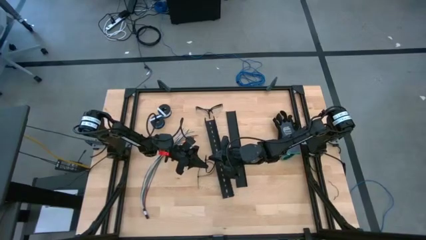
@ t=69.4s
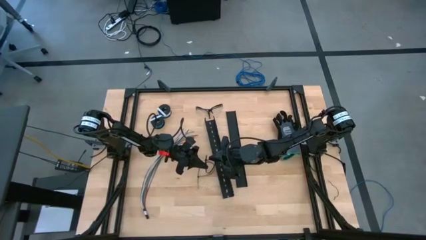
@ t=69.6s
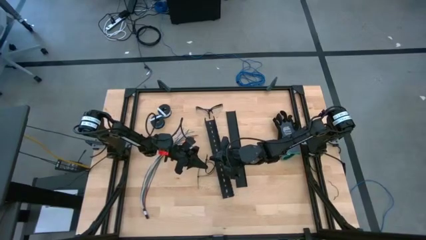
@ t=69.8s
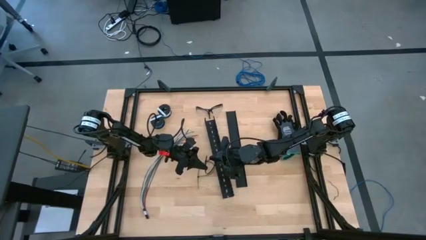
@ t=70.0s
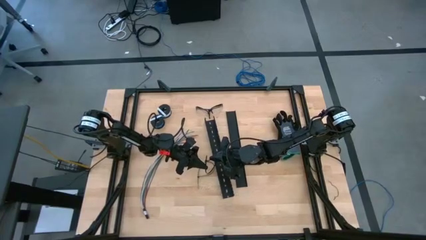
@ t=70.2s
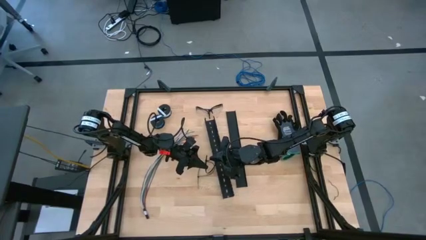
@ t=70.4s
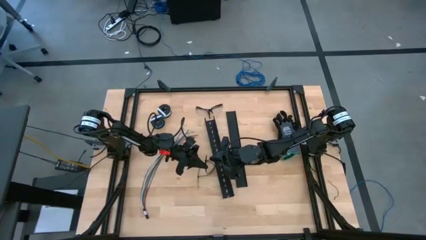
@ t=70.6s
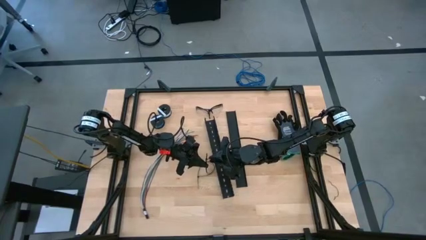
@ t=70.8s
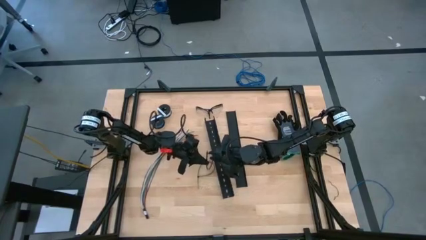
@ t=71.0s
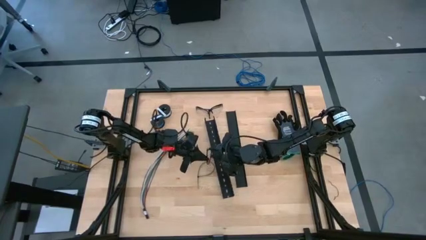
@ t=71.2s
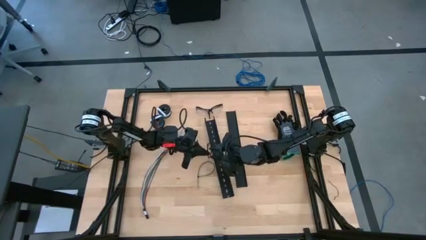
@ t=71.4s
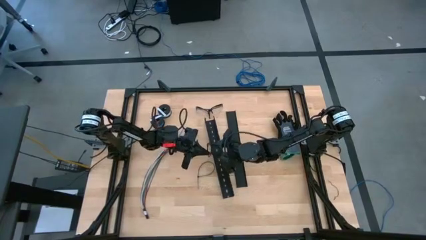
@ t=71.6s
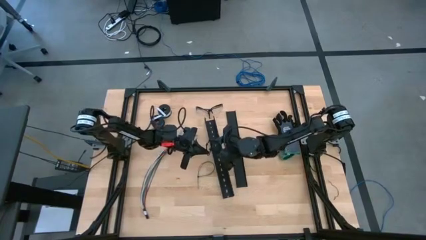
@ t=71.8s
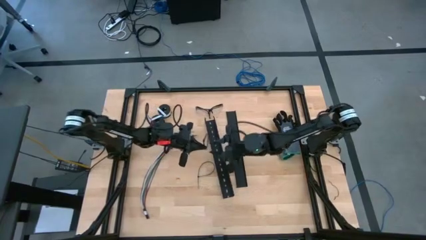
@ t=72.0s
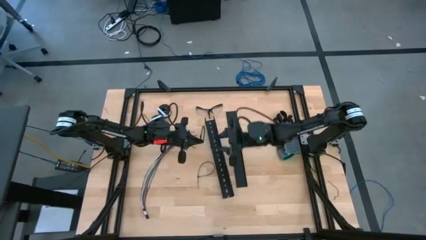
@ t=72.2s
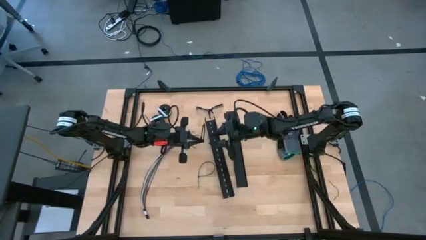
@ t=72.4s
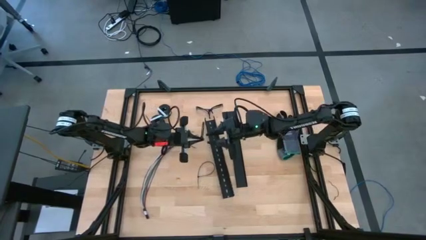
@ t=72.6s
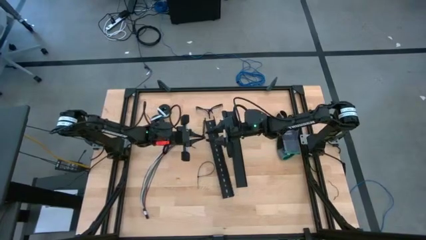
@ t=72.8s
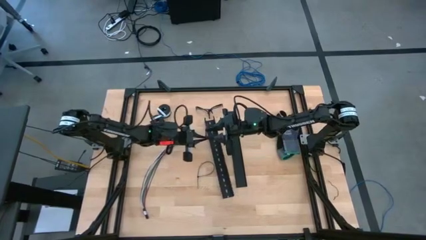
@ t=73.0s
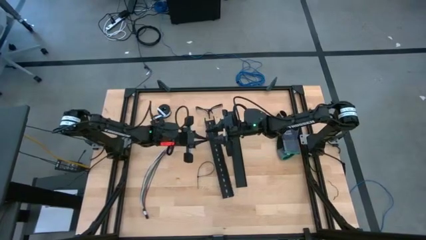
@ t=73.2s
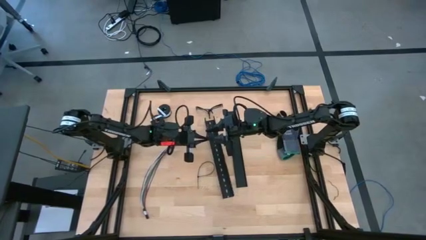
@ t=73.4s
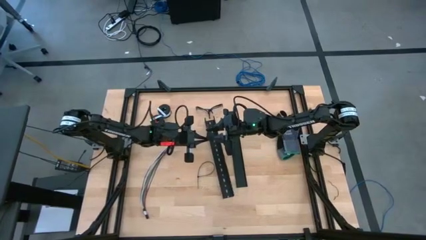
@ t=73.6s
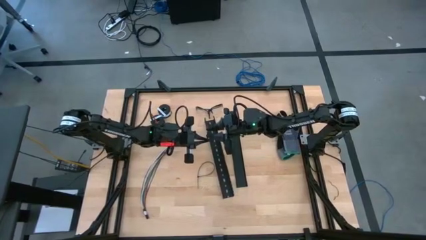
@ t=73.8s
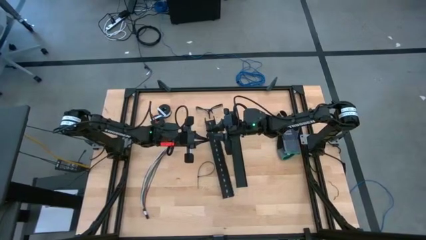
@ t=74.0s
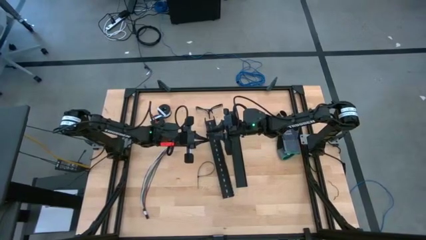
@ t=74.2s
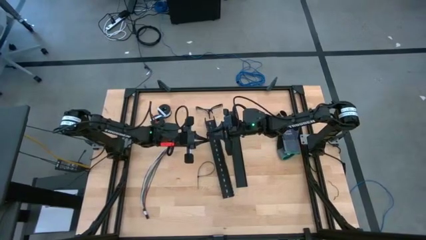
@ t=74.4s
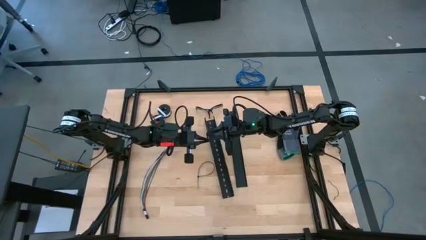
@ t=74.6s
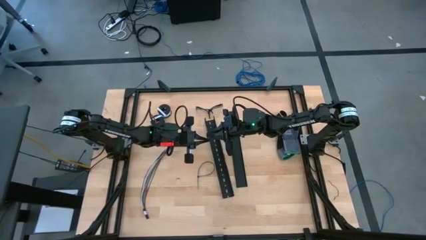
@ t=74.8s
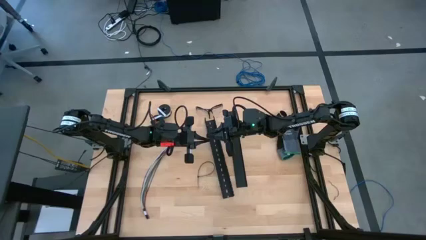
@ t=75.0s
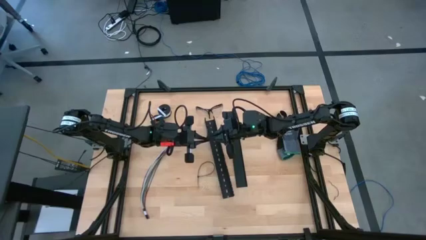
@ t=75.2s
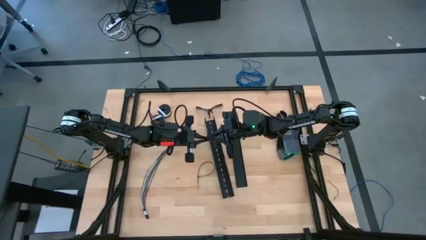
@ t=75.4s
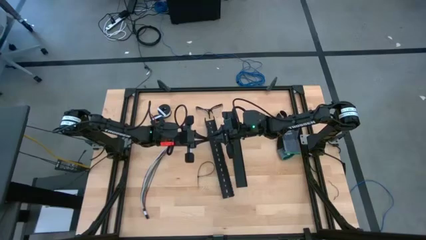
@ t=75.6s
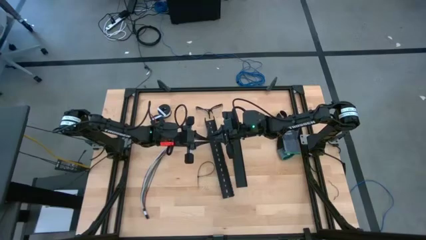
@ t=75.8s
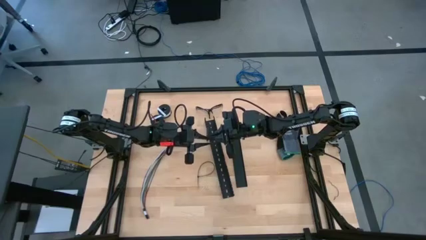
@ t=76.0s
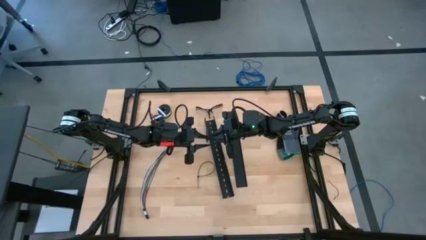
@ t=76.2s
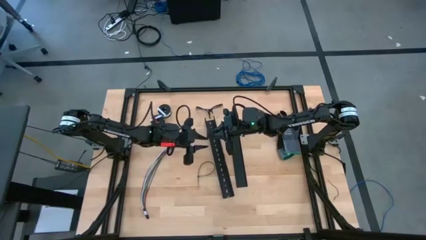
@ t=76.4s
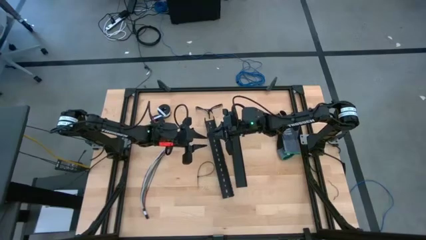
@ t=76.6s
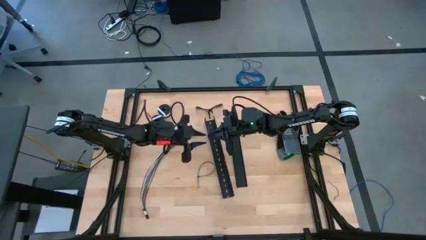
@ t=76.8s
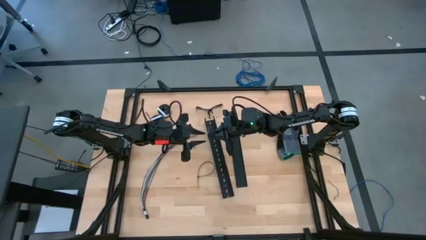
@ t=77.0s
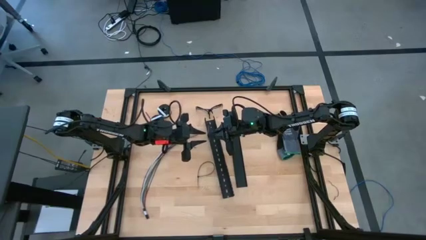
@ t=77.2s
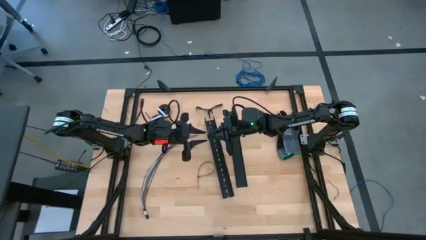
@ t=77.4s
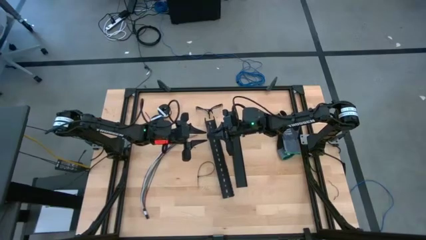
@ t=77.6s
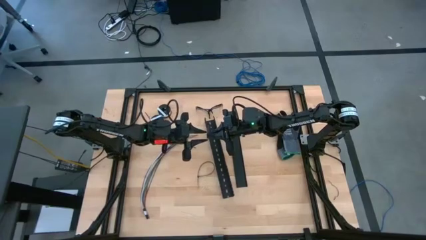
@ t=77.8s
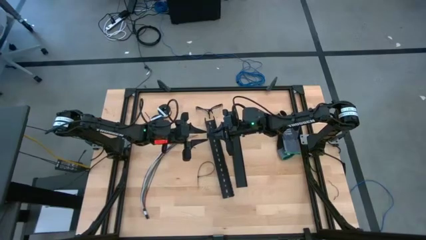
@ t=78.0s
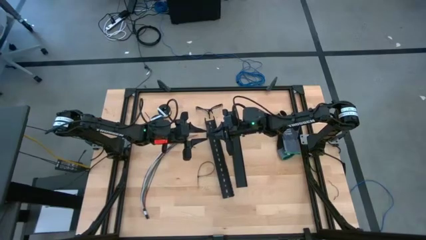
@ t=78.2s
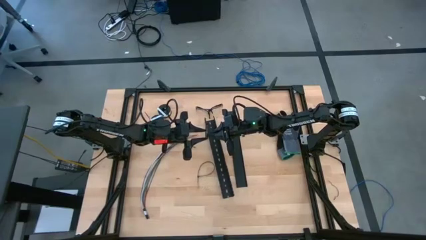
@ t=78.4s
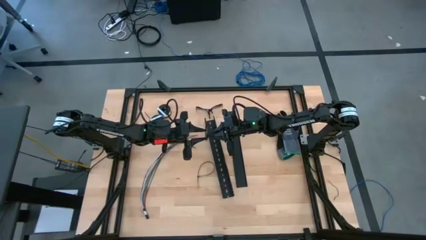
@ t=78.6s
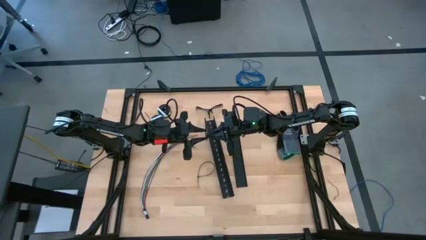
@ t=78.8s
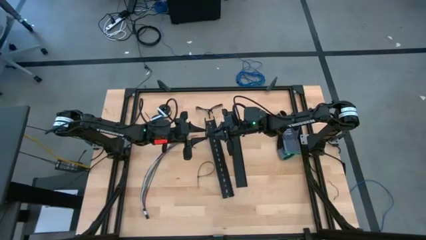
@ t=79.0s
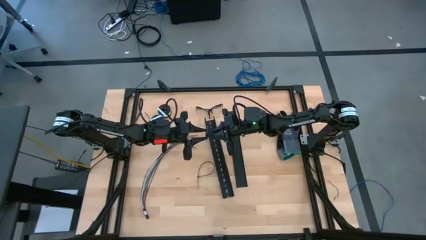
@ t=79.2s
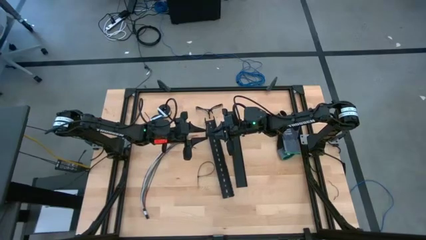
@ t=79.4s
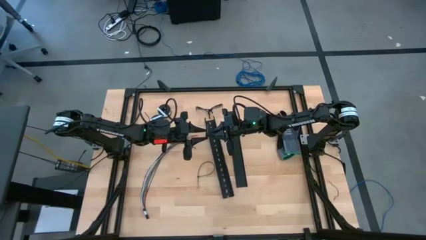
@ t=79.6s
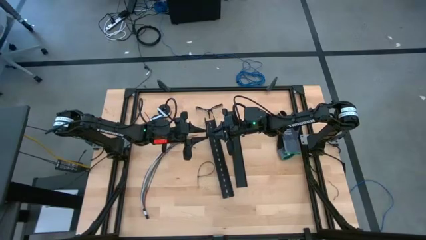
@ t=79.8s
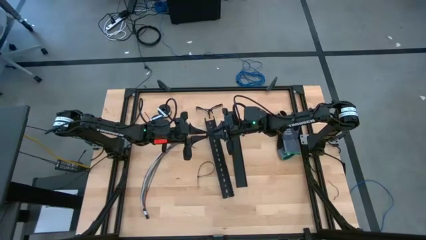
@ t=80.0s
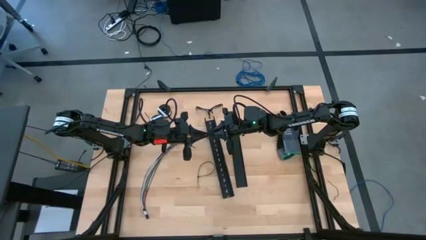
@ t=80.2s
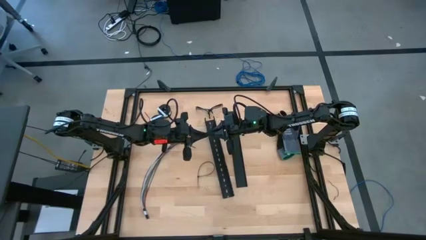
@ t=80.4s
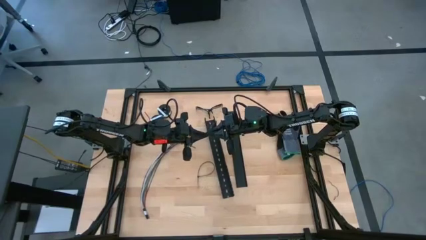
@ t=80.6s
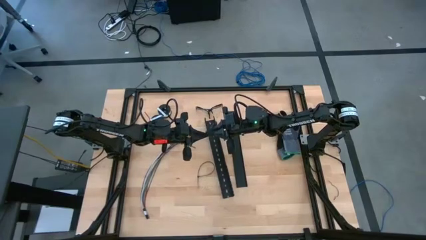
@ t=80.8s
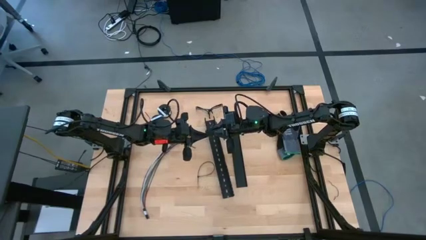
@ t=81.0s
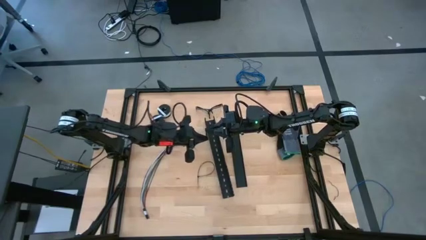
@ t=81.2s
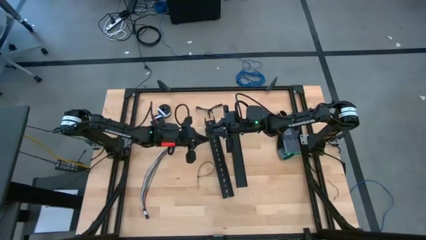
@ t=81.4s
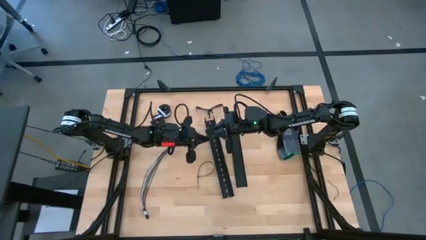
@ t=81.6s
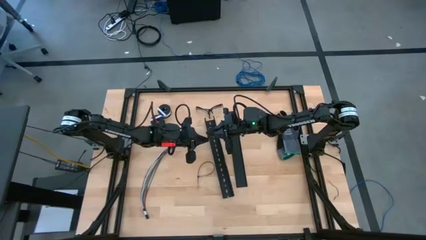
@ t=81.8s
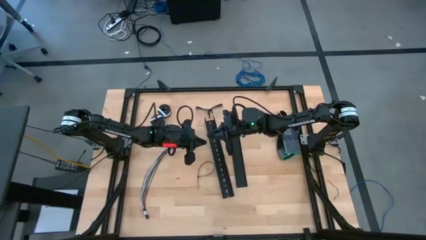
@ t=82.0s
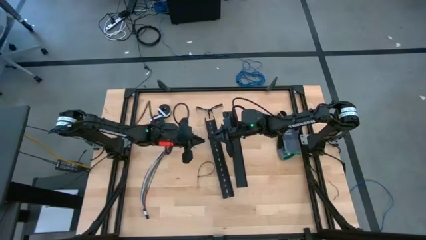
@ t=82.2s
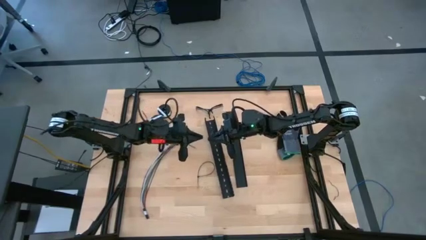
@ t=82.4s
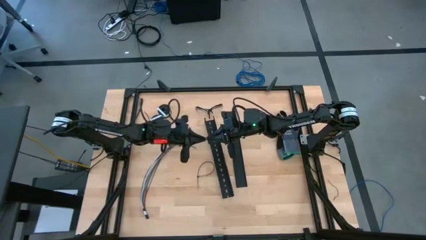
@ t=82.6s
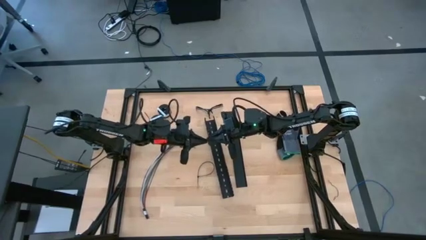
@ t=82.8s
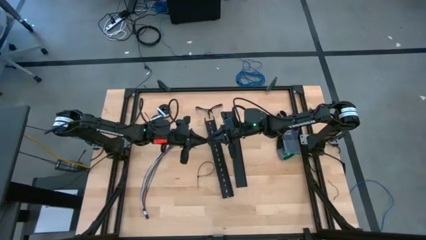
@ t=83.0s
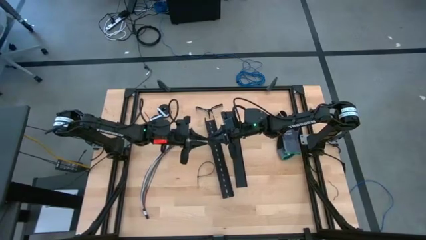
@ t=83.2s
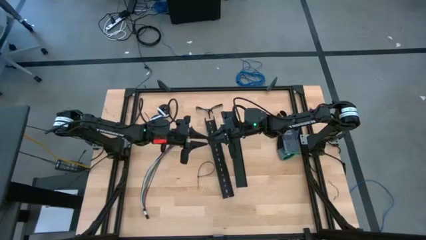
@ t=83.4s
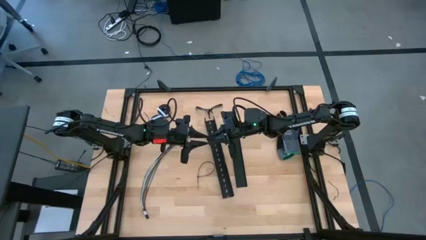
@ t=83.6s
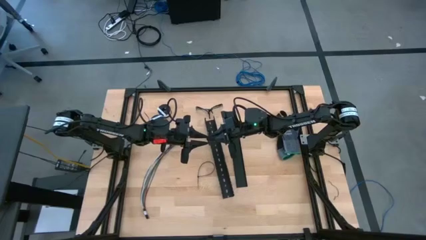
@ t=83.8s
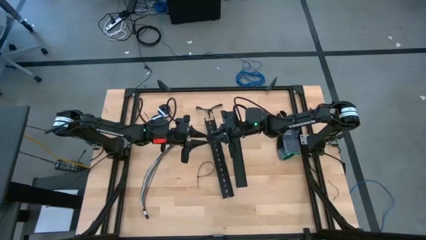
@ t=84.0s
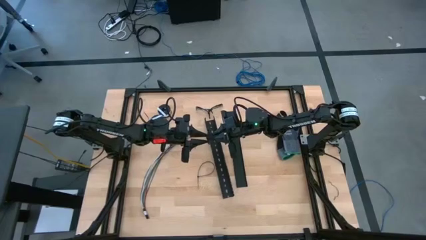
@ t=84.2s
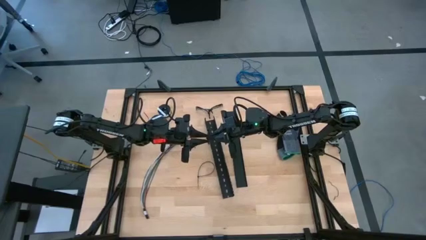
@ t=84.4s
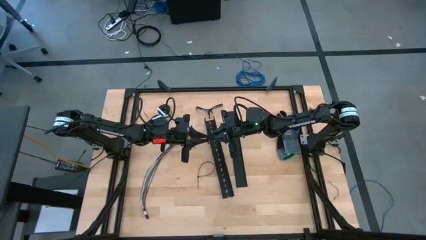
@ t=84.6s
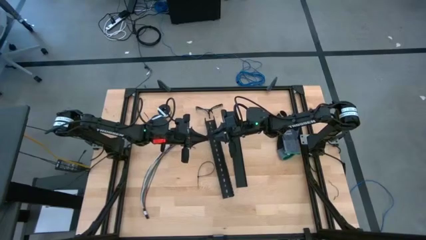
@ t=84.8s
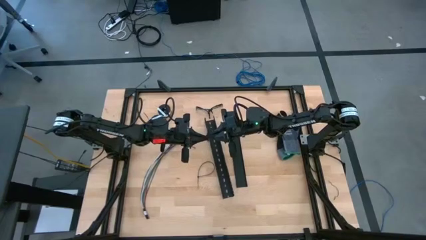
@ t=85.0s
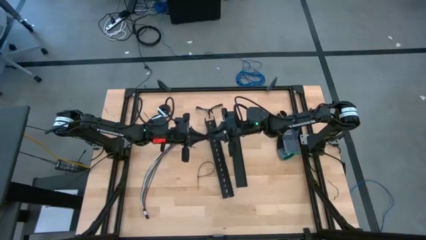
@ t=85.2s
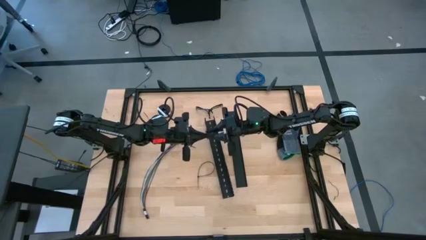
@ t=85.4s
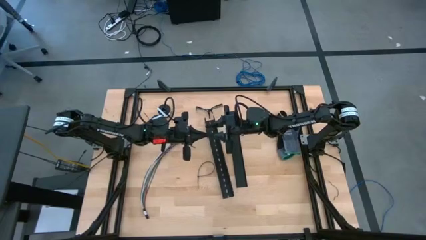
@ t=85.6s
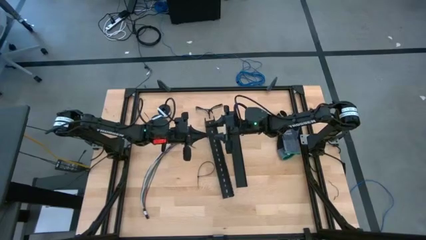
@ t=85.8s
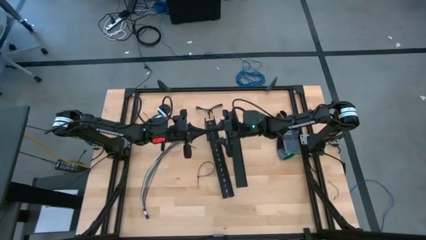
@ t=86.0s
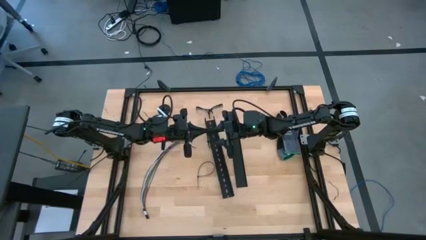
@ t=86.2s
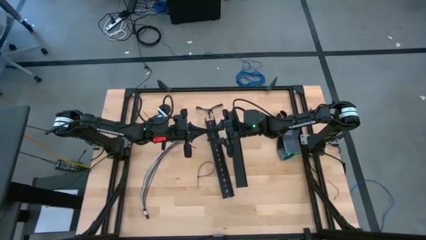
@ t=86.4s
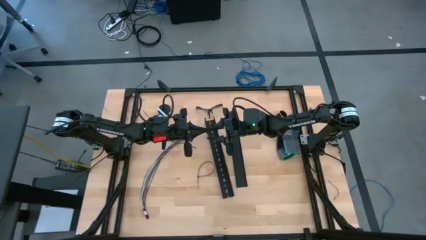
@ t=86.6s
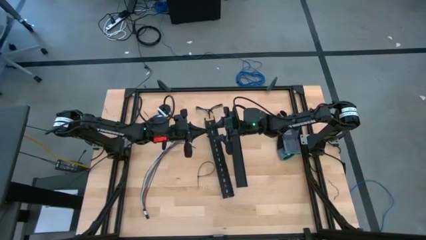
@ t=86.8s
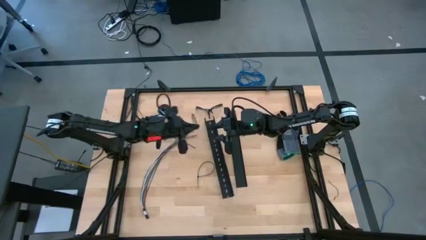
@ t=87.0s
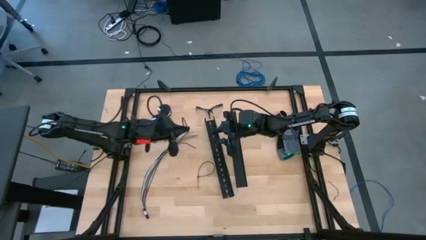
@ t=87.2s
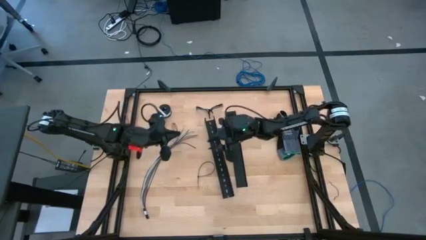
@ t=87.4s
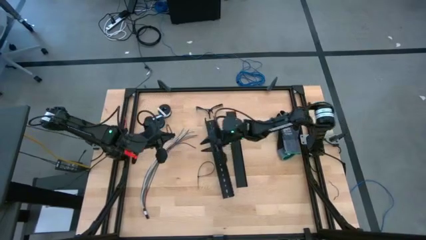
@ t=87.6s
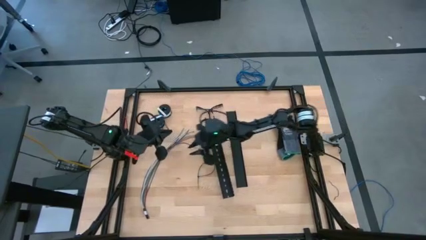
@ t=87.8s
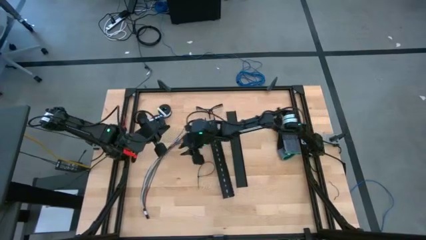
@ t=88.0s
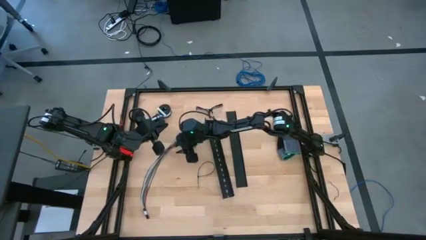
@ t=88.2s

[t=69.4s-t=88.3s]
Task: Ziptie cables
Wrap the black zip tie on the cable
